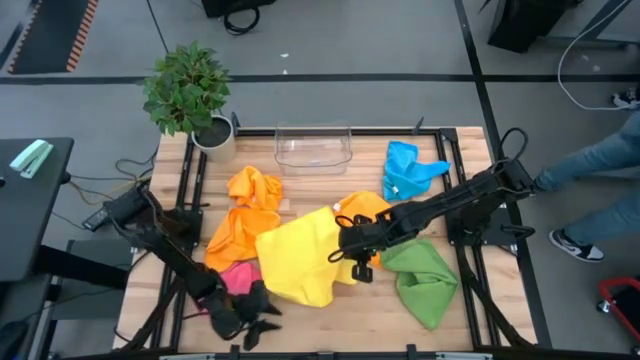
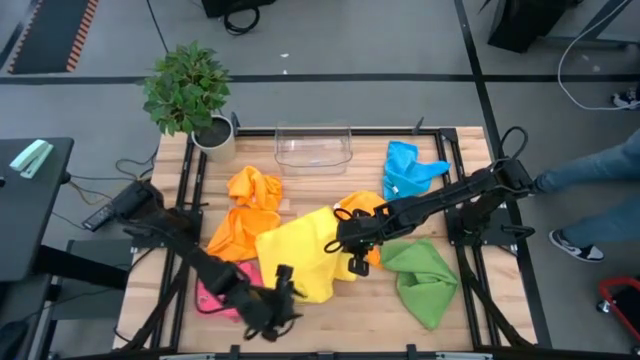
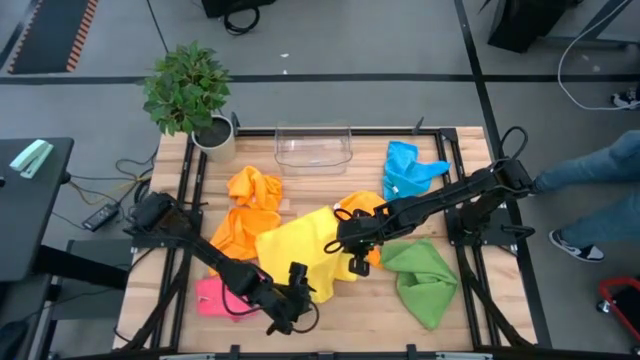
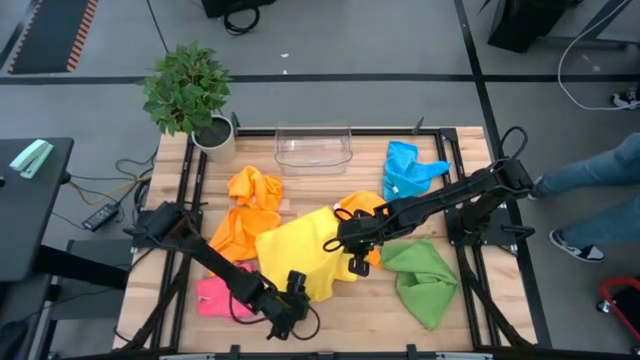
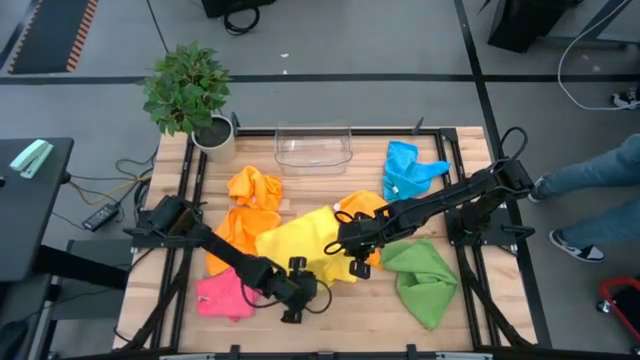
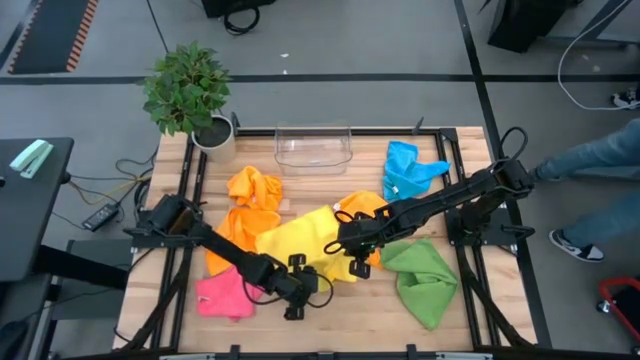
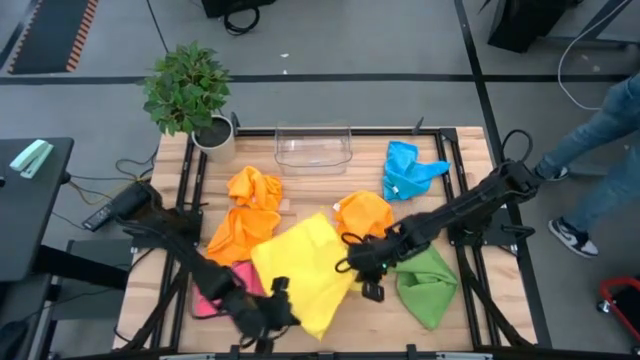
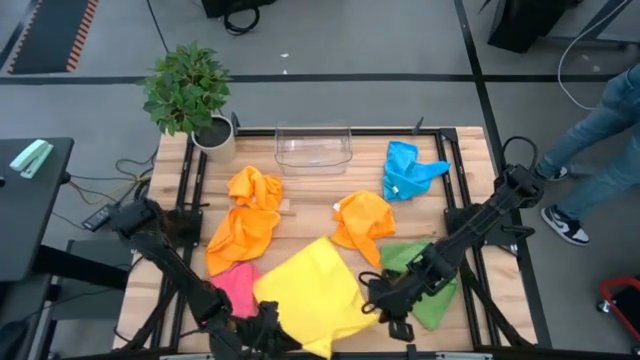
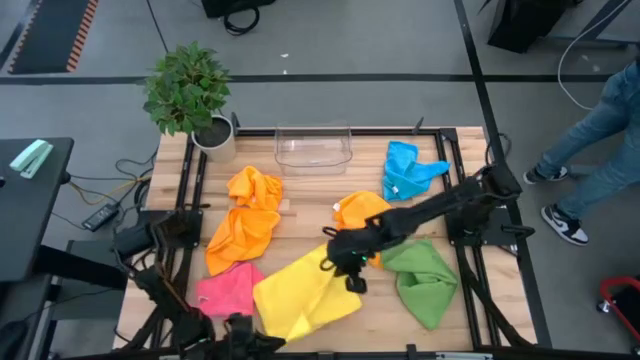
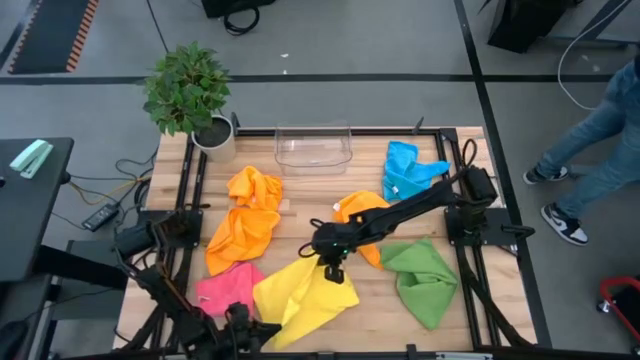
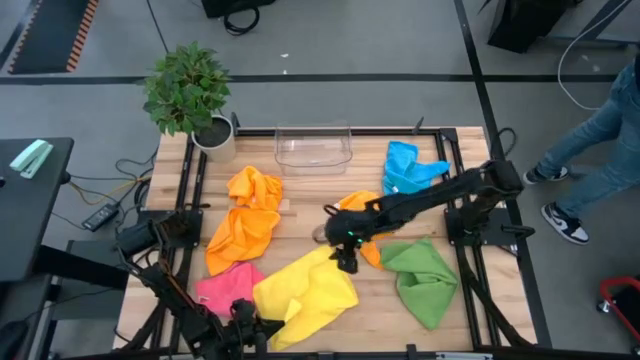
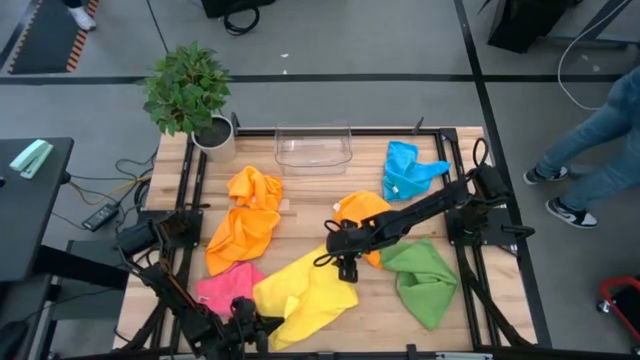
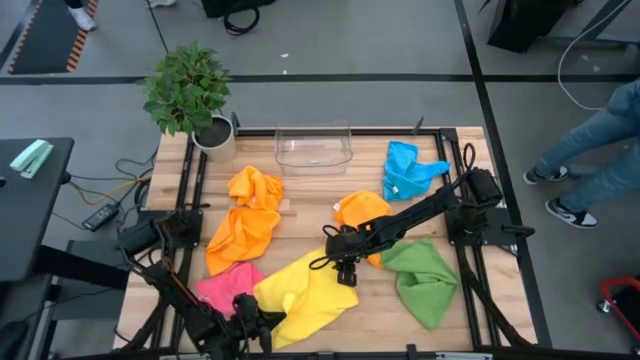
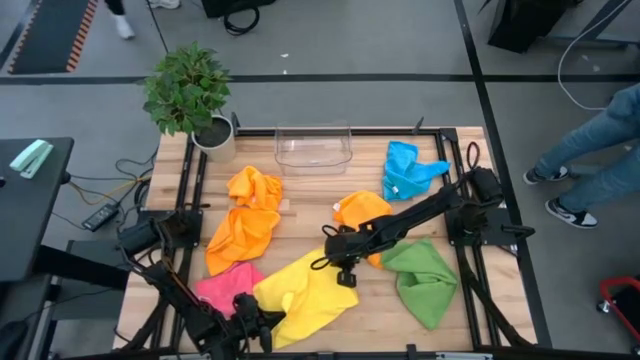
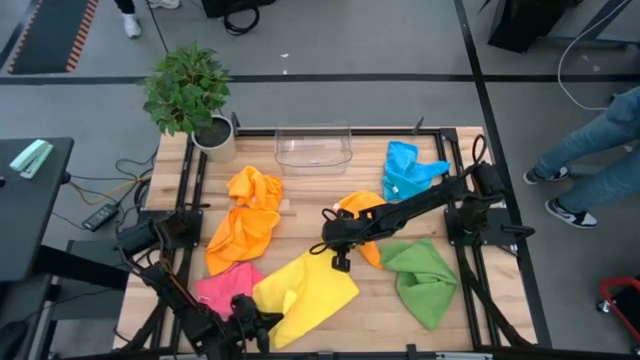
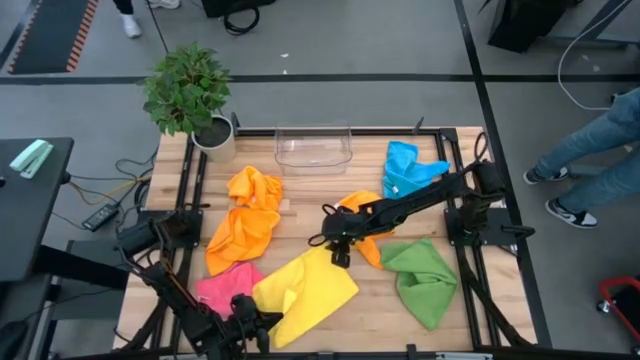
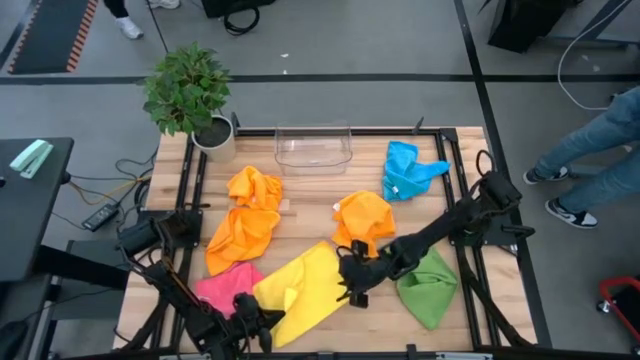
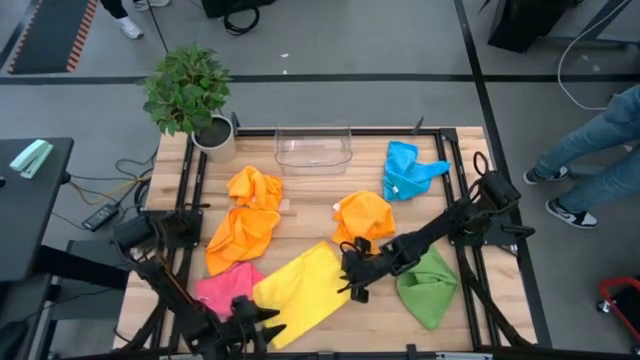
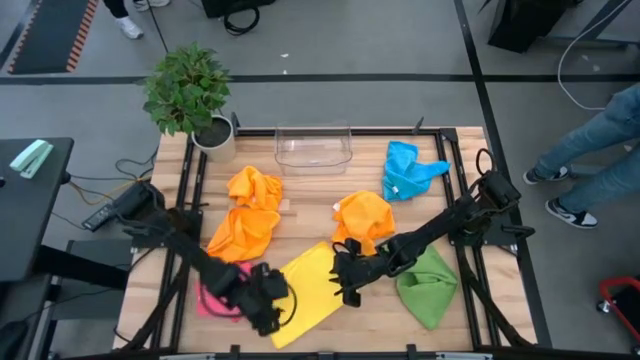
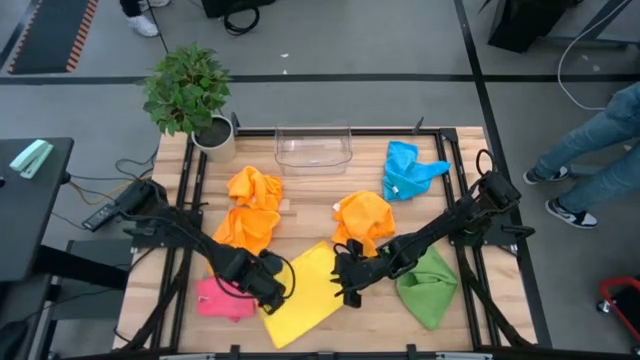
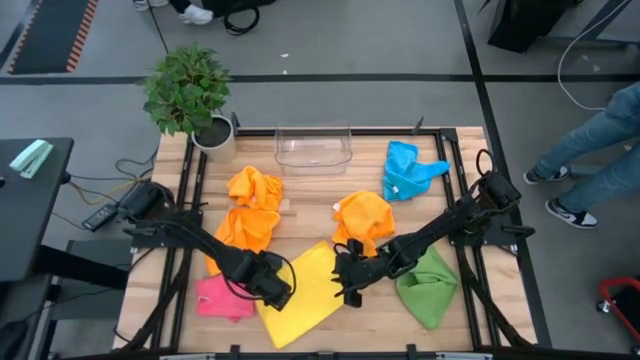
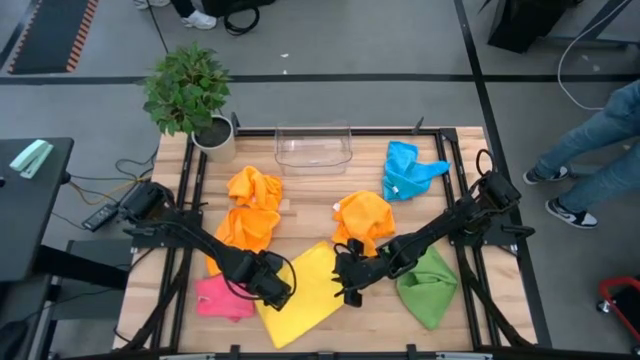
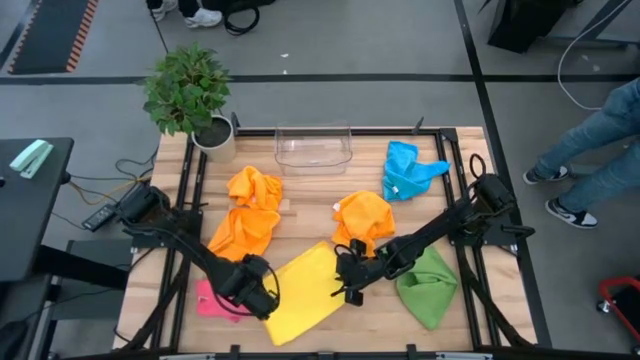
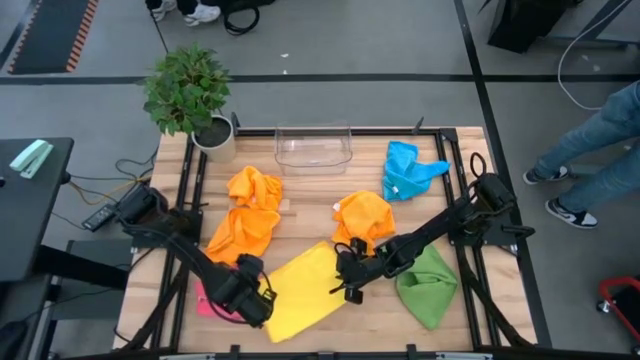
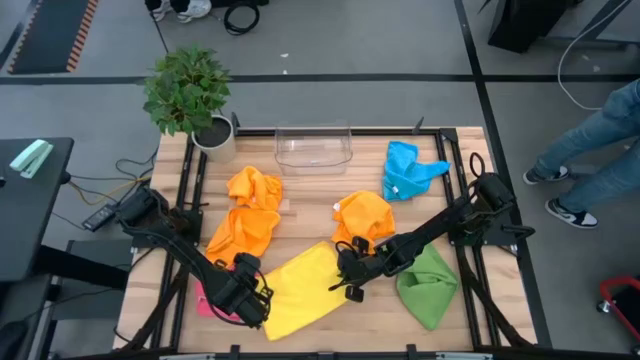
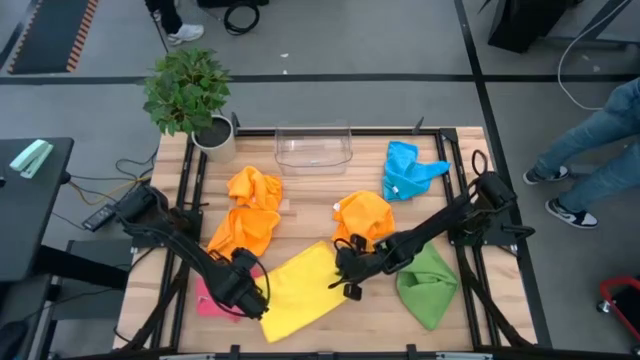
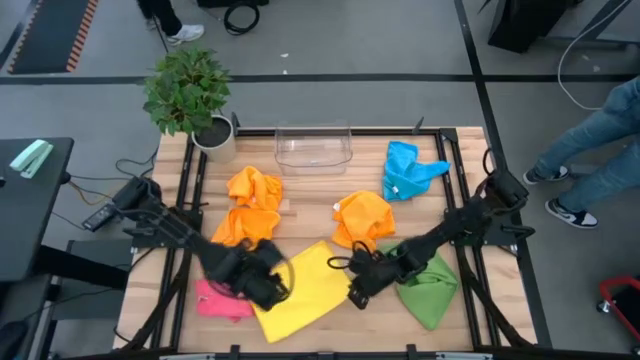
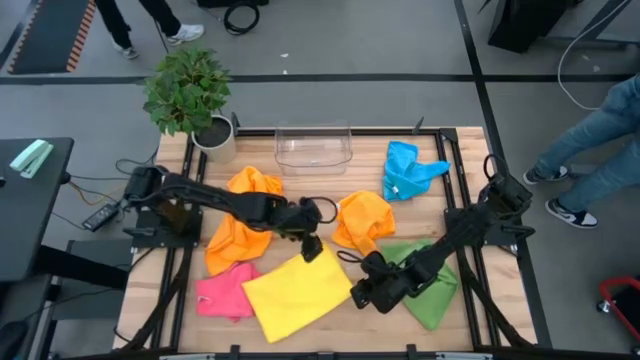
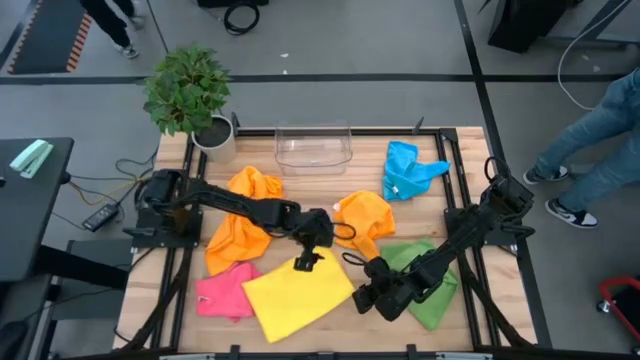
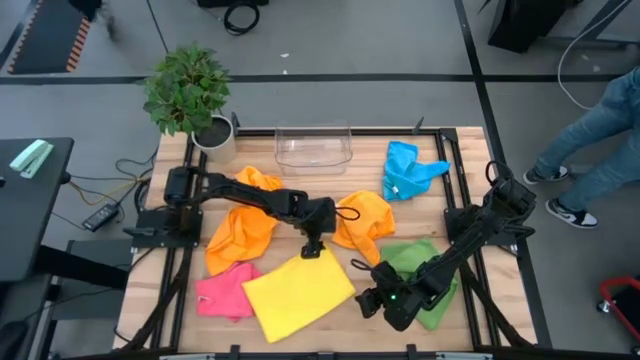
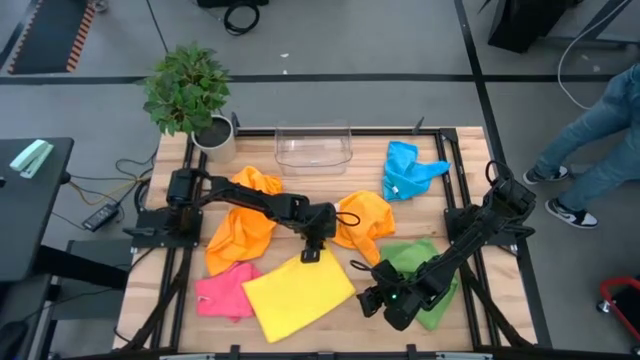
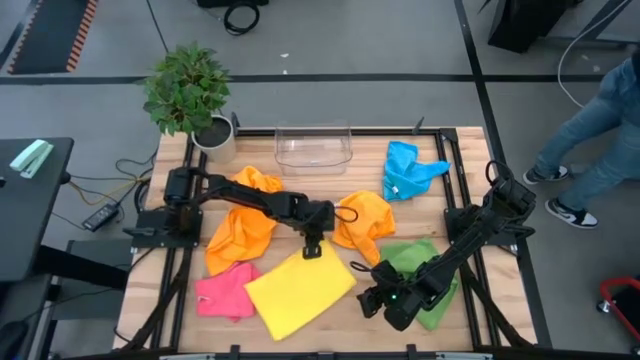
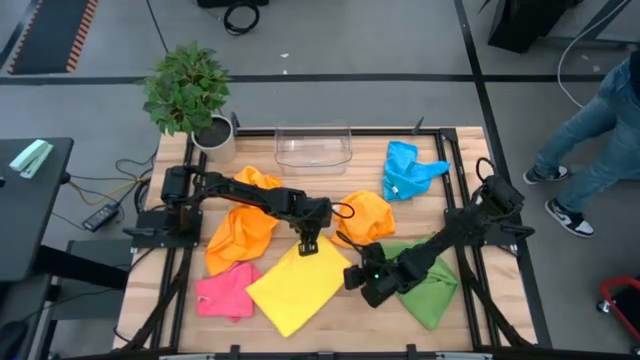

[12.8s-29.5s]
Task: Fold microfiber towels
Fold the yellow microfiber cloth
